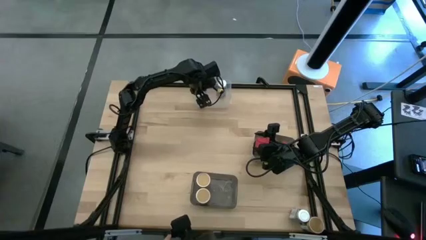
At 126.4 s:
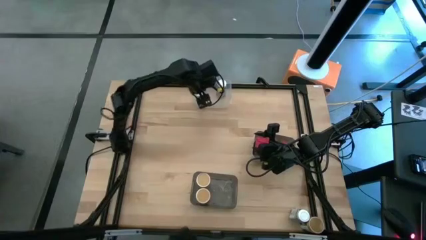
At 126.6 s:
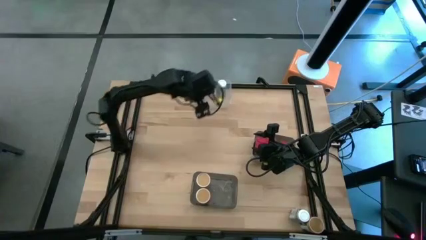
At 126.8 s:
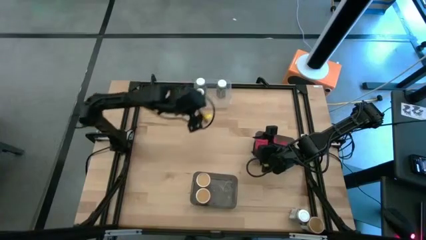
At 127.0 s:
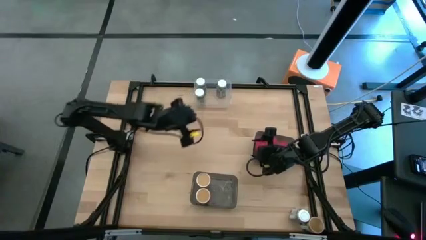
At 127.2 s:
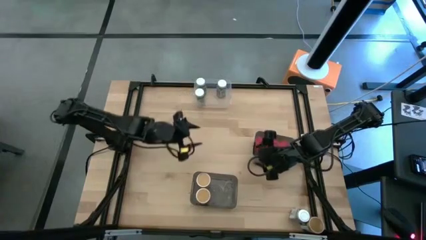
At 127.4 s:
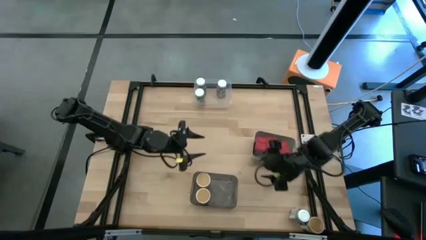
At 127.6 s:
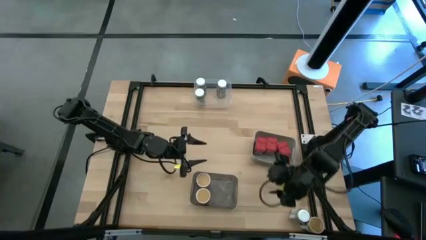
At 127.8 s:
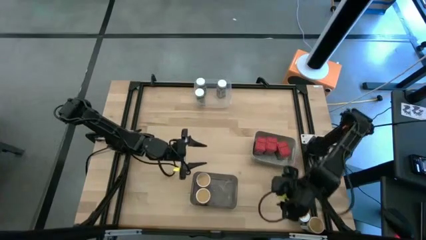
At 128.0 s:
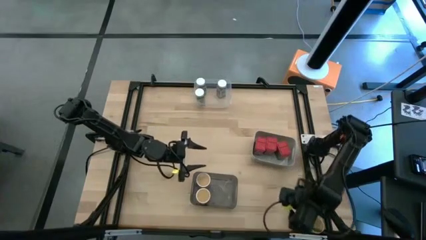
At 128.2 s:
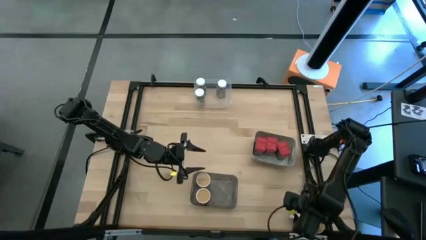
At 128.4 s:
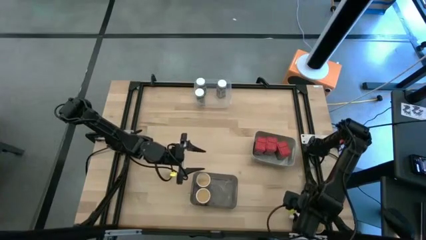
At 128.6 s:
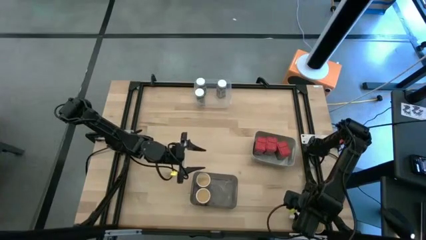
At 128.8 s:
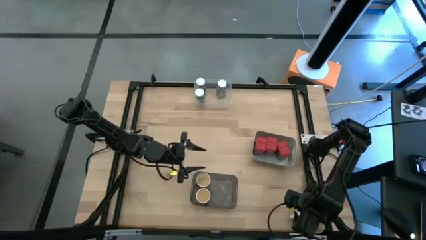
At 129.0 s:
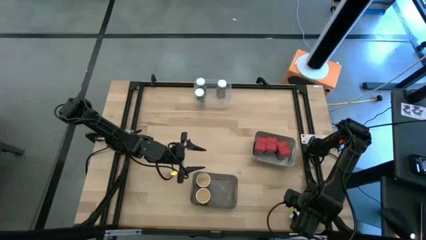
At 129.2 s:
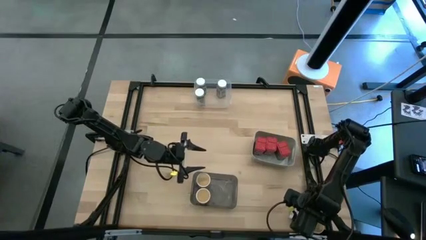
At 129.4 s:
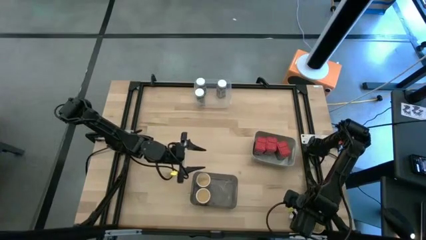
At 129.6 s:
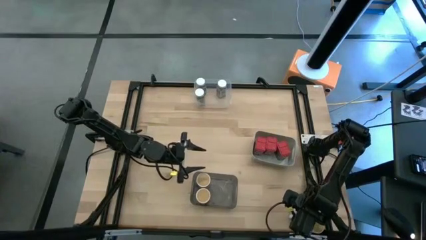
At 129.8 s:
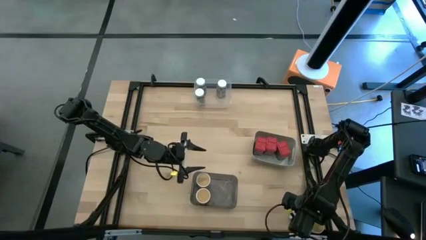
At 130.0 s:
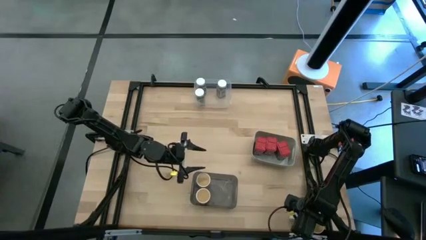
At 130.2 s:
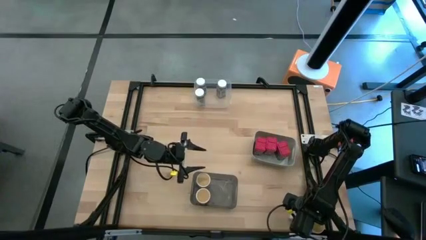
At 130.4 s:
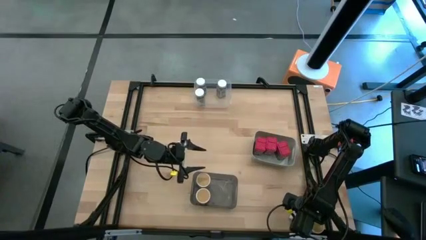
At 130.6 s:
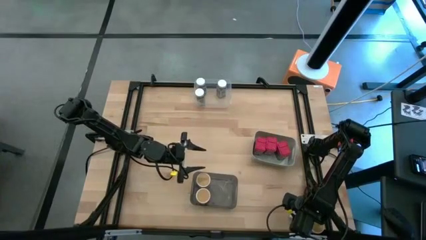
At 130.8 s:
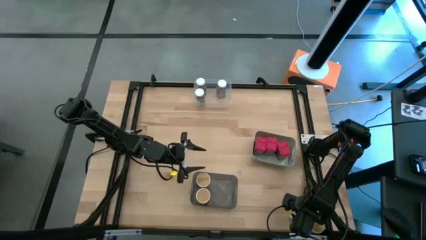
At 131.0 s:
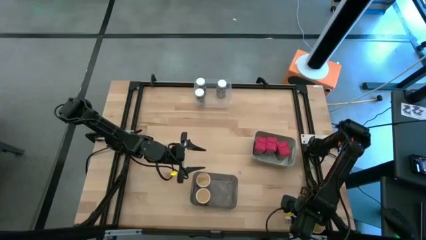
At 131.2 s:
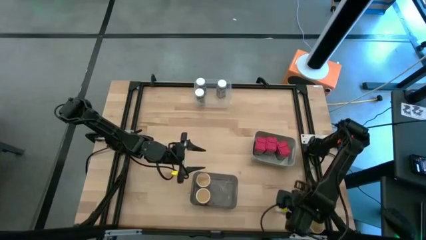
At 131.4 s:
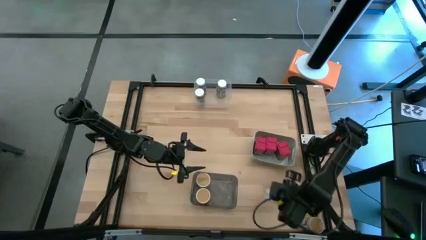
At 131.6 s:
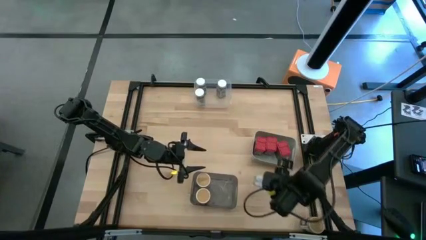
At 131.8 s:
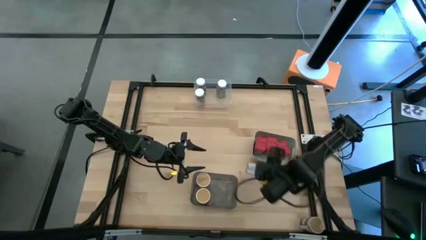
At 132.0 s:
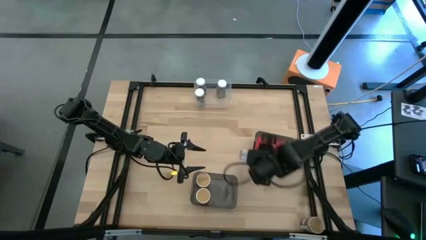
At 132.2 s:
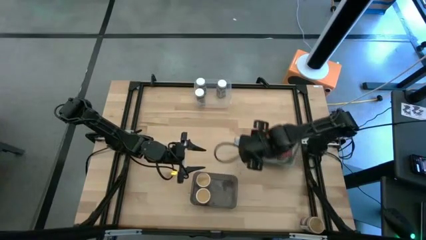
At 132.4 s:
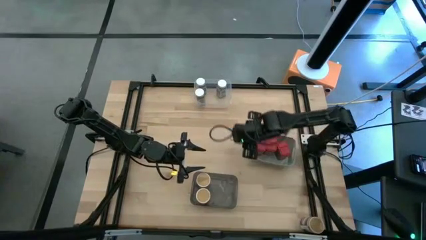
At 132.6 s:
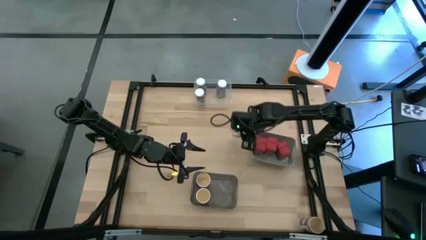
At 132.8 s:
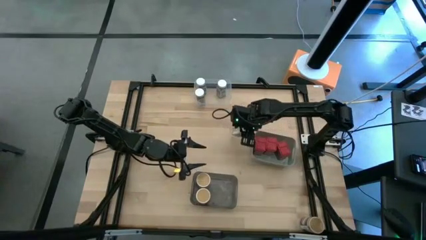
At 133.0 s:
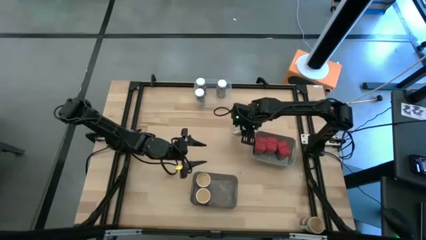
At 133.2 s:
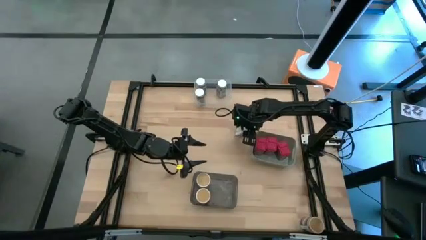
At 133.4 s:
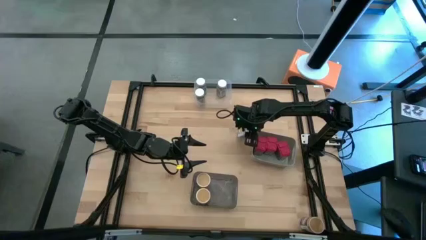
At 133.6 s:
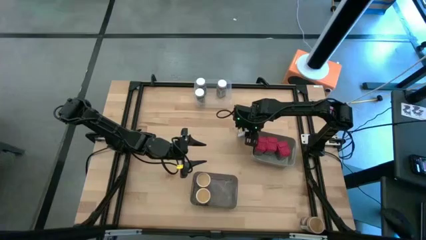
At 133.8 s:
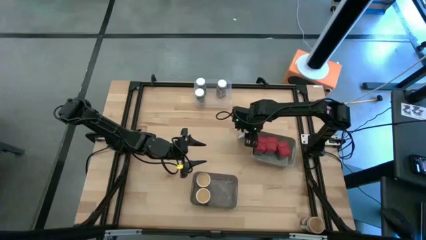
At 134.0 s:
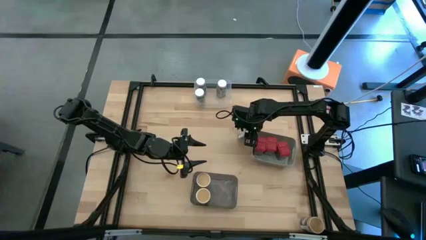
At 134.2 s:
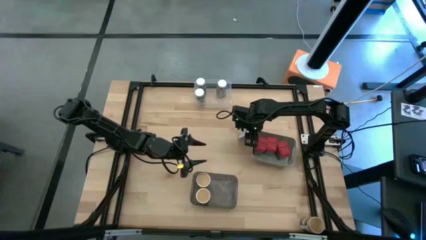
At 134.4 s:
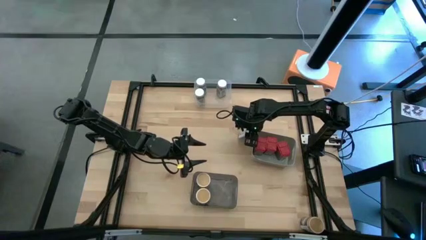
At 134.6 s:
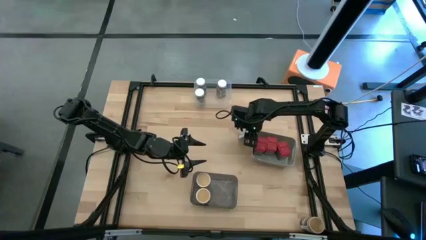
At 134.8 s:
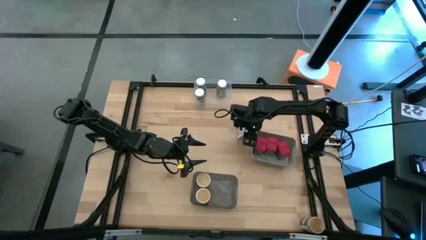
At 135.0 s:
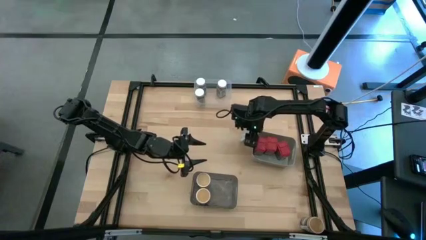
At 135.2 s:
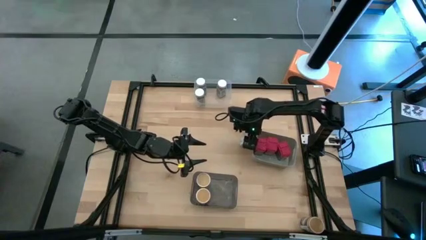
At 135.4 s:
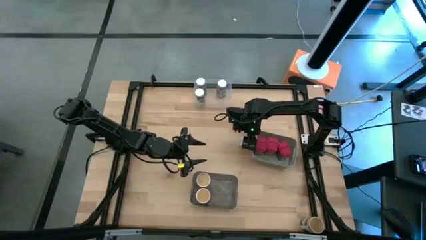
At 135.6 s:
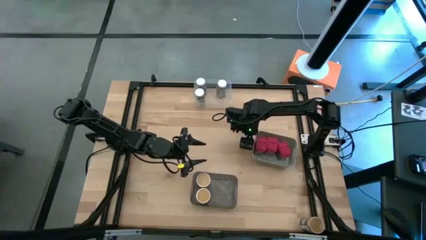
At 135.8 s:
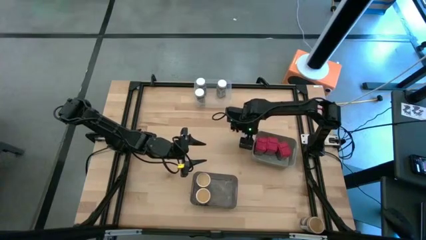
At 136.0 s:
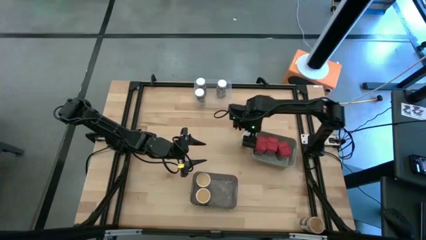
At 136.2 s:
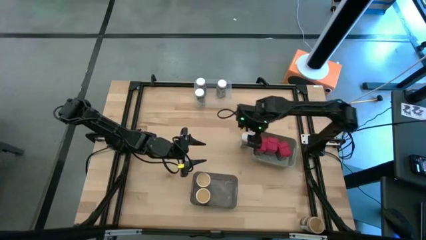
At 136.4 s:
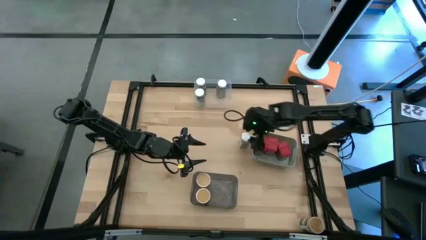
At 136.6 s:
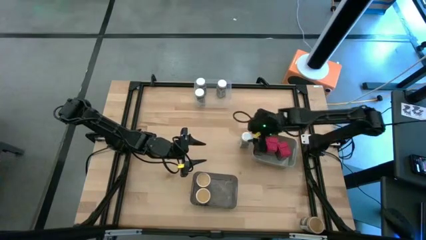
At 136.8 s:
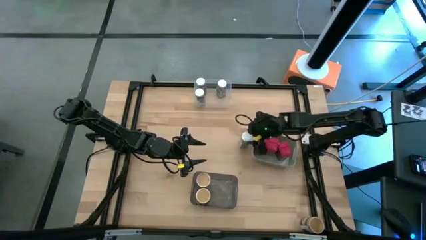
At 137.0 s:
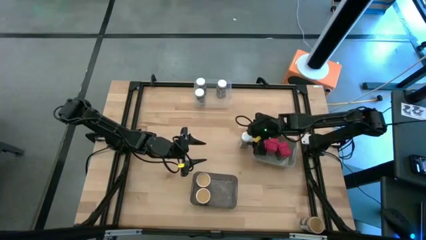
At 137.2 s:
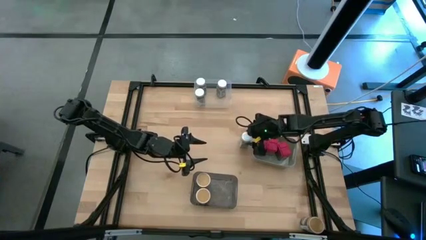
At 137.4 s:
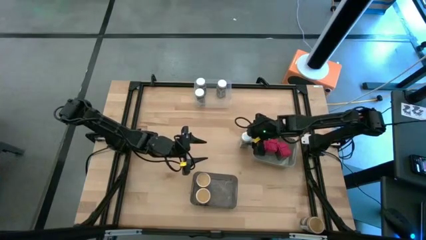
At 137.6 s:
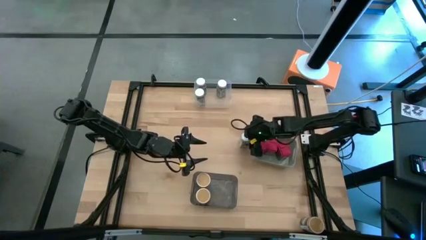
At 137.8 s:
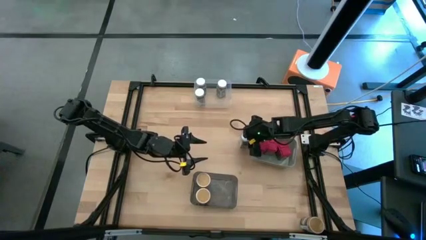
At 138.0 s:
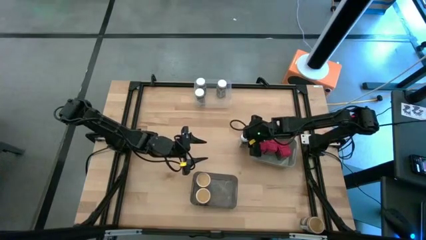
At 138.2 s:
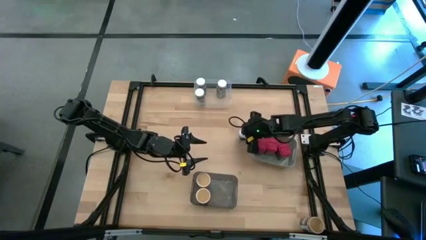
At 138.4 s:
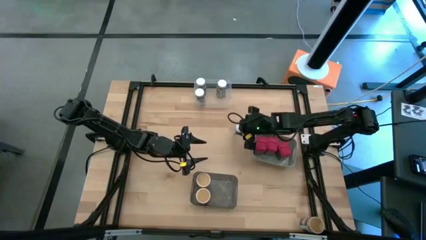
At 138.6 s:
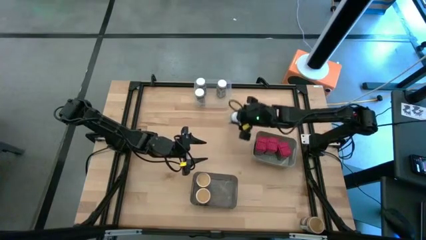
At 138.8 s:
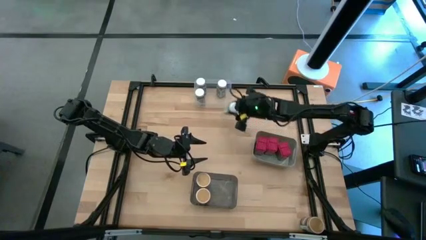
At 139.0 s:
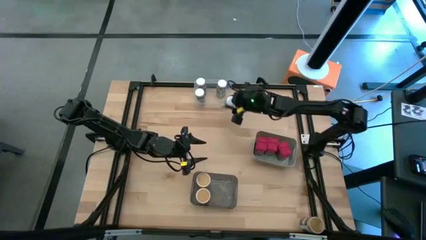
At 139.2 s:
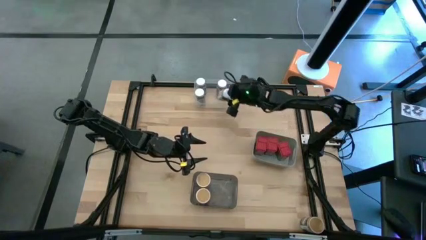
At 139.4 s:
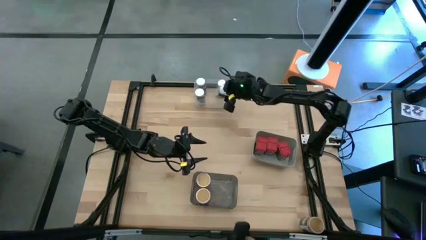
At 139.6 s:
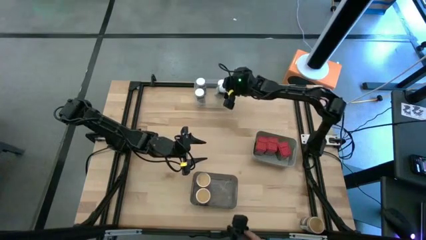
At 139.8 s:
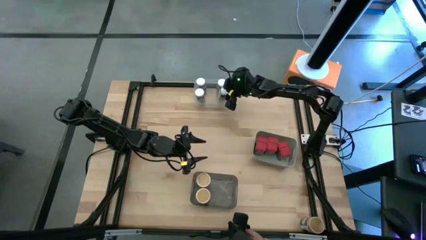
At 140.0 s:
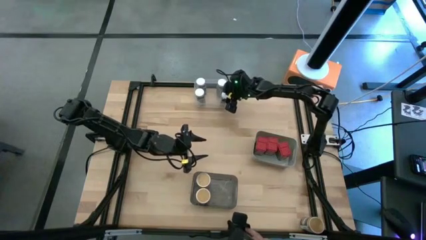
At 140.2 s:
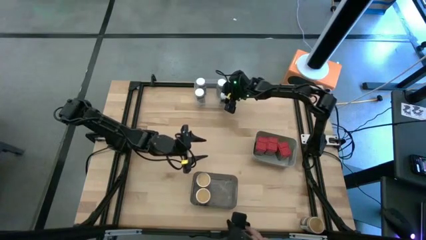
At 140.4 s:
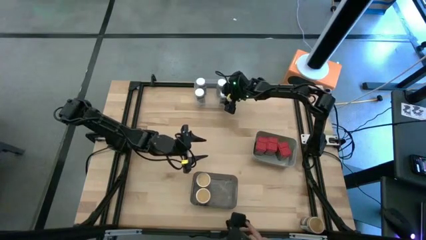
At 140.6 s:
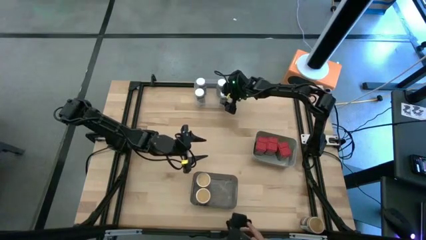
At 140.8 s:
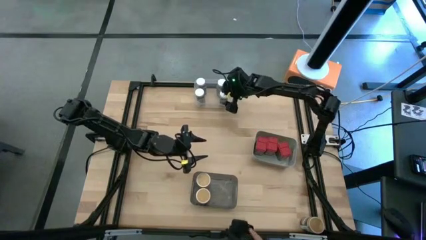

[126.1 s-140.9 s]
Task: Sort spices by type
Put the white seasoning bottle into the transparent bin

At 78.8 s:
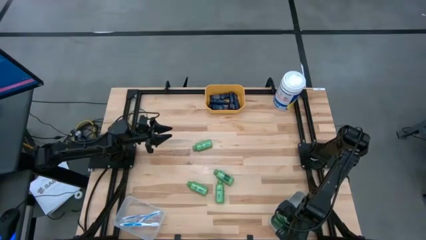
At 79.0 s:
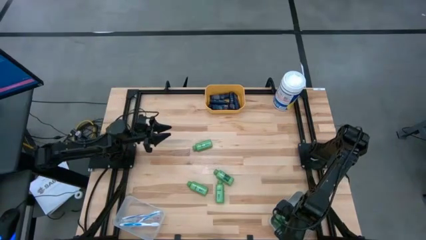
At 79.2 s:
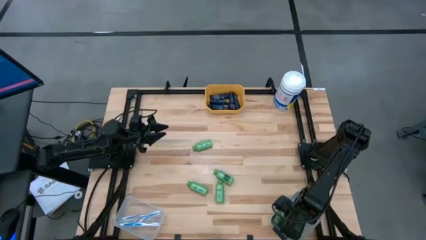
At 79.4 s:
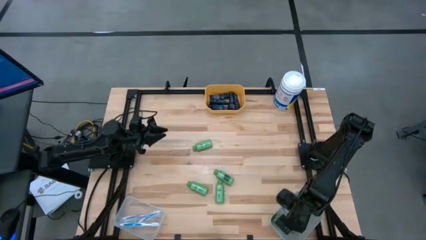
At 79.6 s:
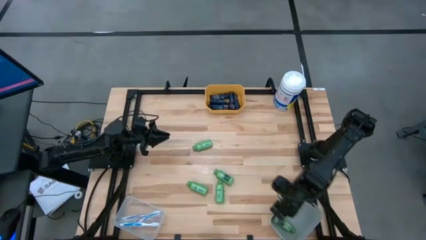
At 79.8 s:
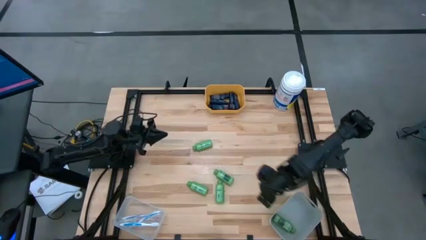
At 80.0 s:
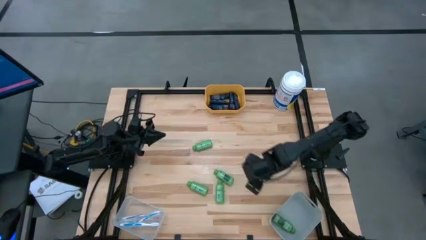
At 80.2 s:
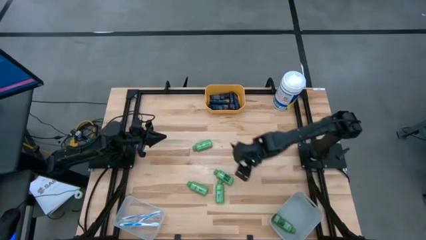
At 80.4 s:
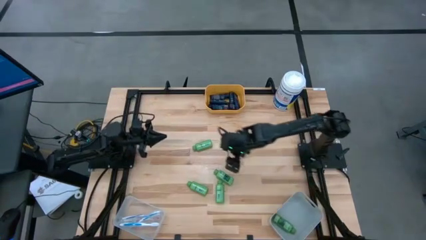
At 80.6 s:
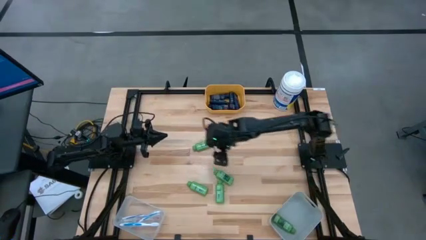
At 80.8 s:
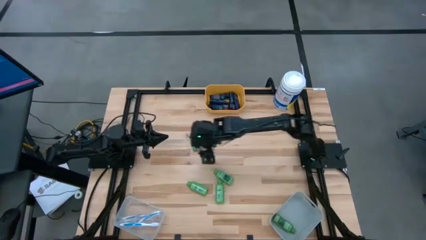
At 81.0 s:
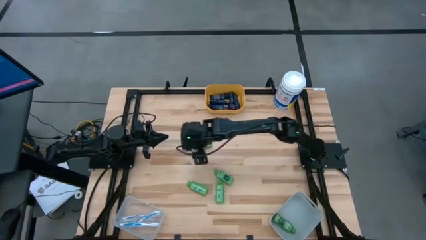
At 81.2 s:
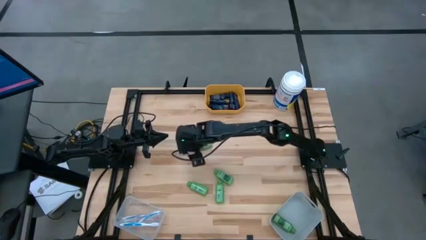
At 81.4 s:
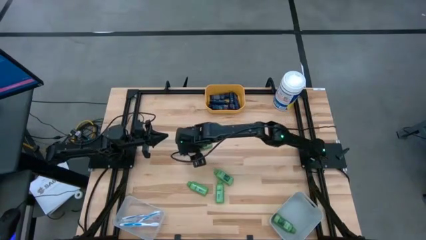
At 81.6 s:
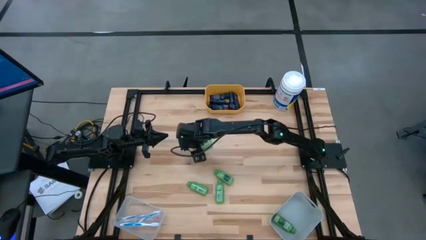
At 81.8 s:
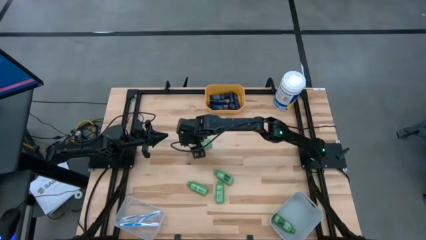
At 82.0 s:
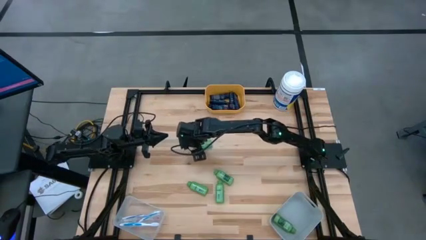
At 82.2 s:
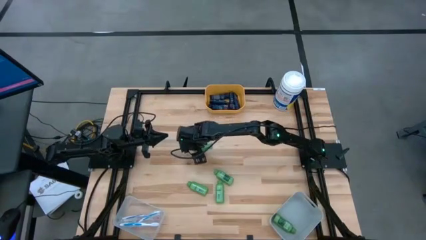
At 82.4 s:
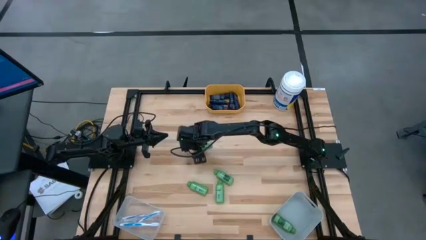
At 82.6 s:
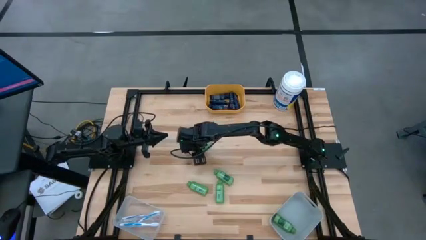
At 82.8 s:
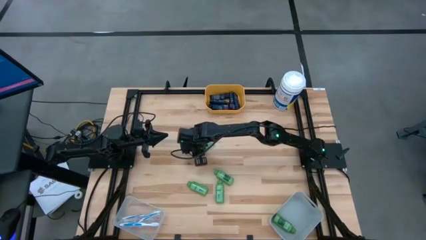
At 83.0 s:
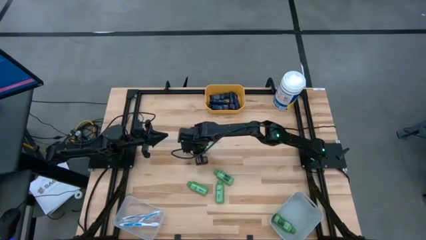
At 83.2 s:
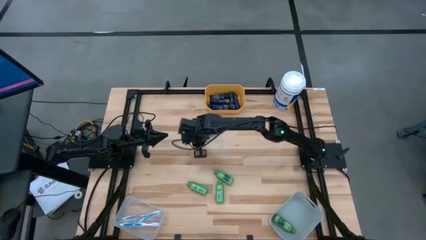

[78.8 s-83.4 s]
Task: Pick & Place Travel size toiletries
Put the shampoo into the white bin
